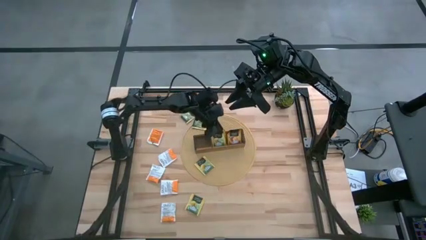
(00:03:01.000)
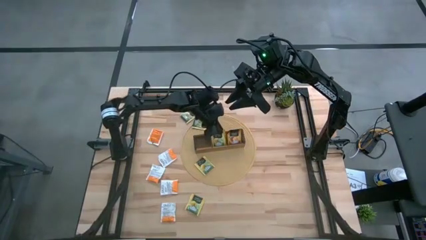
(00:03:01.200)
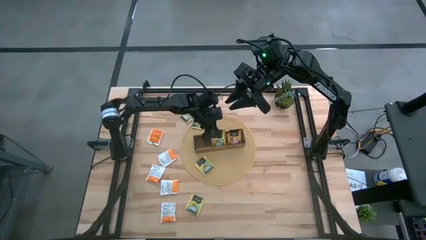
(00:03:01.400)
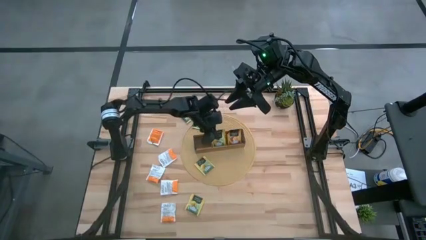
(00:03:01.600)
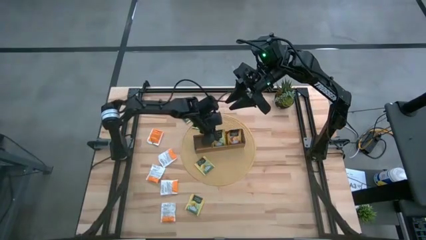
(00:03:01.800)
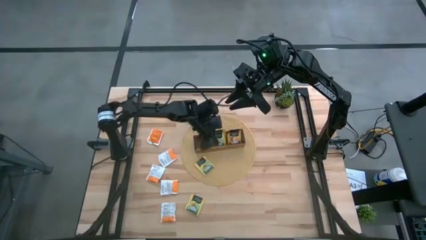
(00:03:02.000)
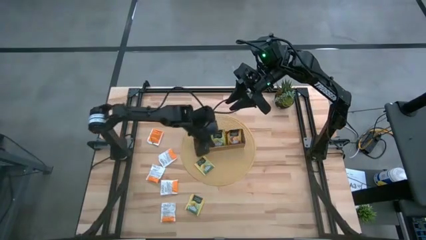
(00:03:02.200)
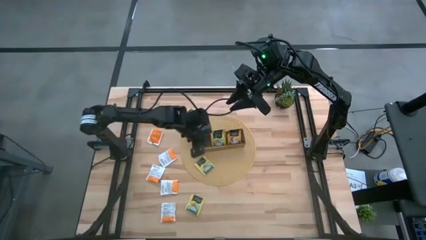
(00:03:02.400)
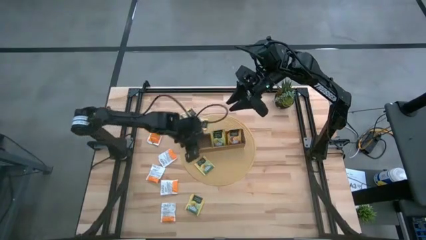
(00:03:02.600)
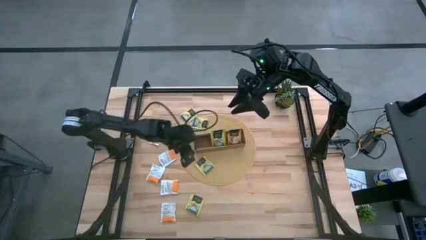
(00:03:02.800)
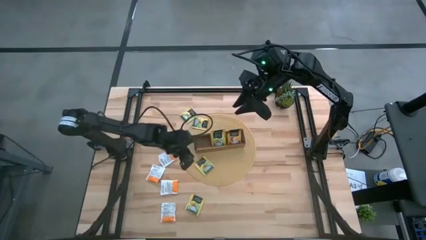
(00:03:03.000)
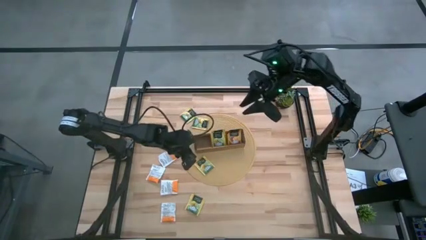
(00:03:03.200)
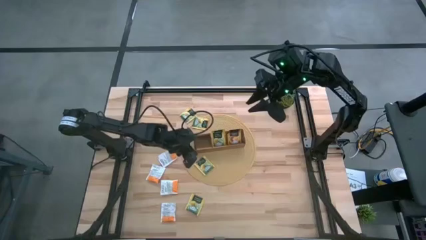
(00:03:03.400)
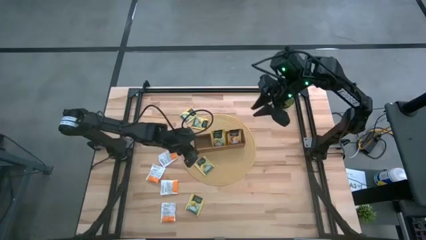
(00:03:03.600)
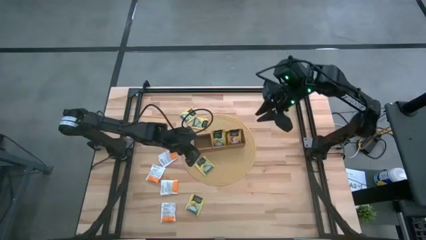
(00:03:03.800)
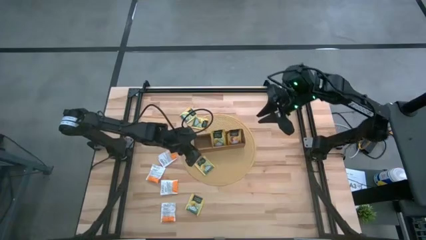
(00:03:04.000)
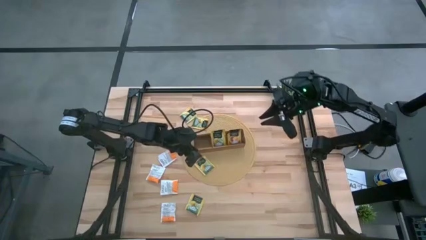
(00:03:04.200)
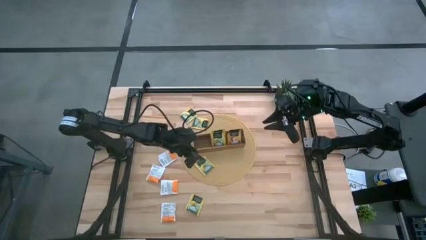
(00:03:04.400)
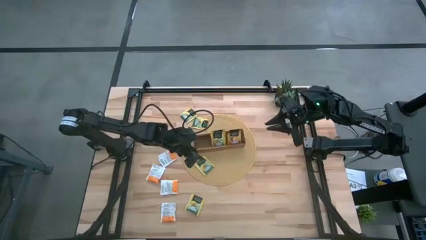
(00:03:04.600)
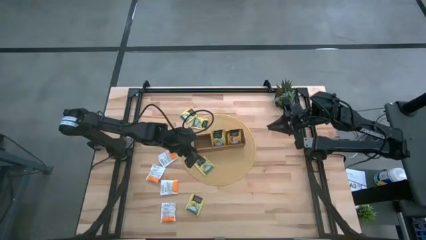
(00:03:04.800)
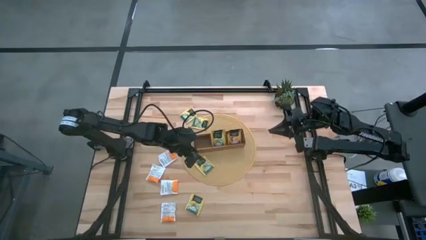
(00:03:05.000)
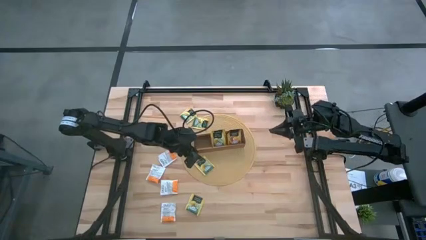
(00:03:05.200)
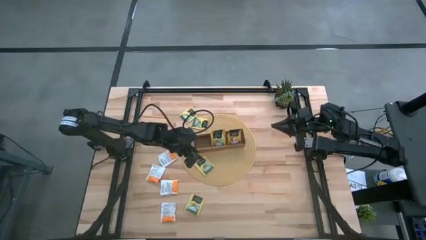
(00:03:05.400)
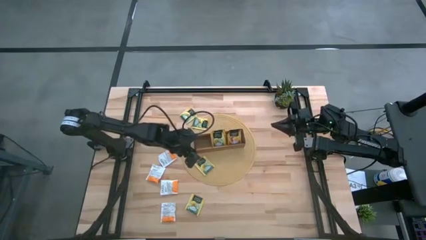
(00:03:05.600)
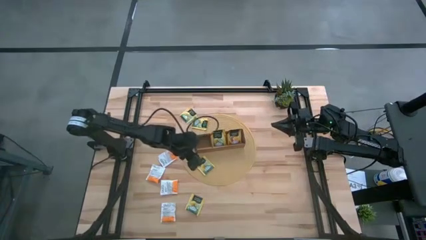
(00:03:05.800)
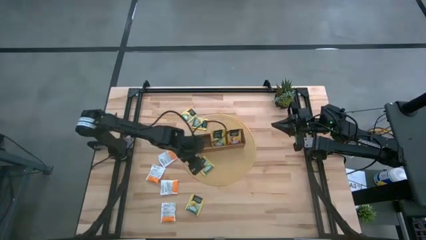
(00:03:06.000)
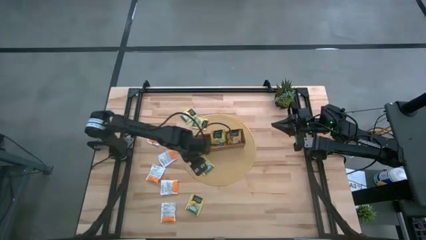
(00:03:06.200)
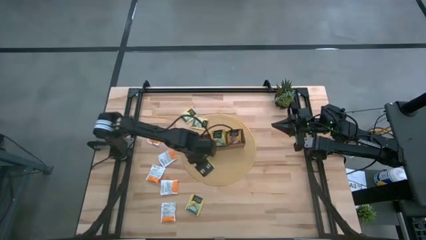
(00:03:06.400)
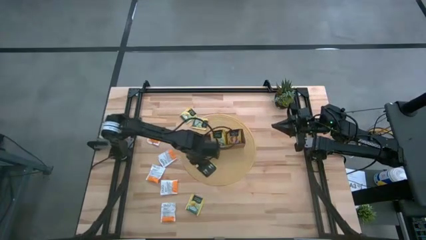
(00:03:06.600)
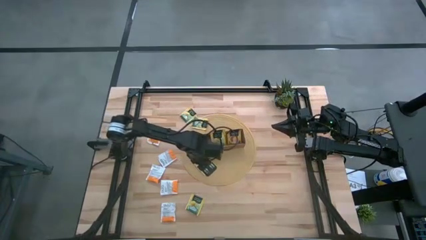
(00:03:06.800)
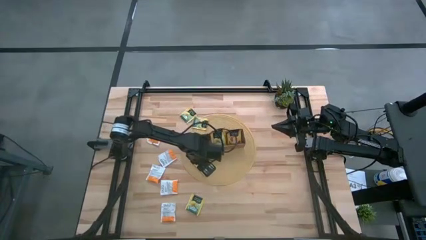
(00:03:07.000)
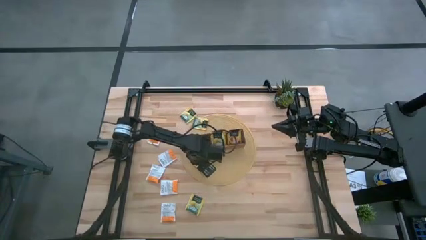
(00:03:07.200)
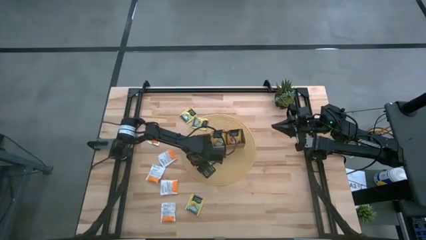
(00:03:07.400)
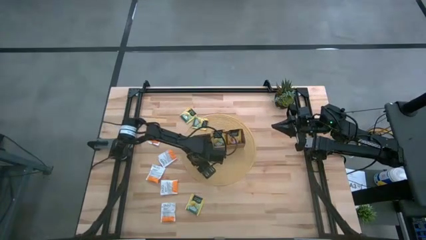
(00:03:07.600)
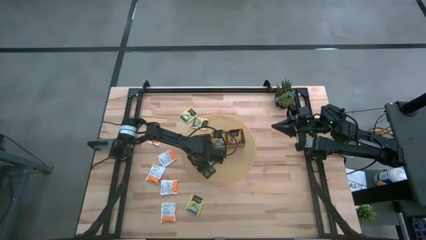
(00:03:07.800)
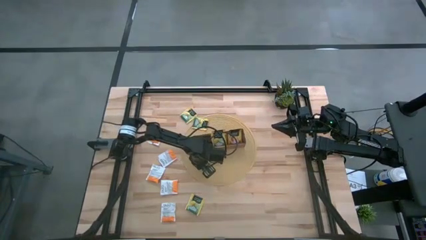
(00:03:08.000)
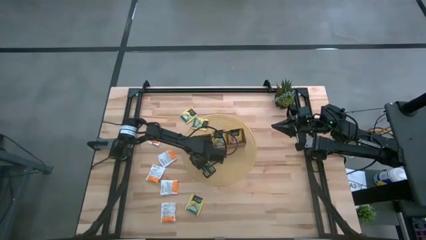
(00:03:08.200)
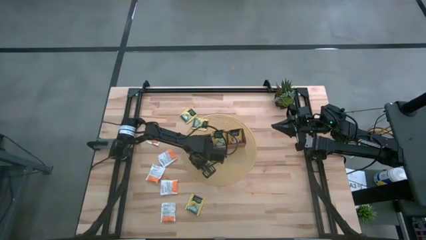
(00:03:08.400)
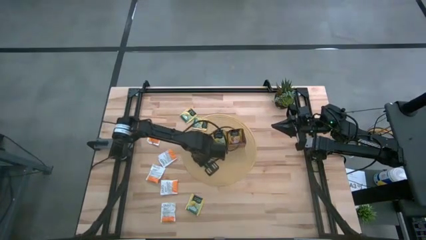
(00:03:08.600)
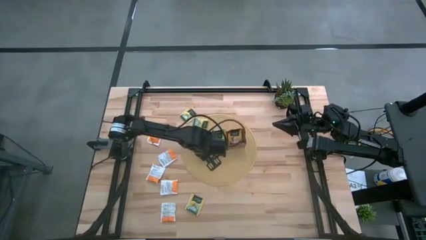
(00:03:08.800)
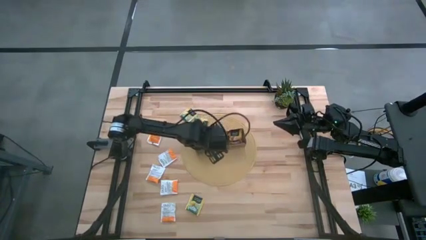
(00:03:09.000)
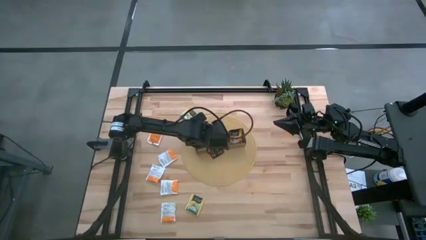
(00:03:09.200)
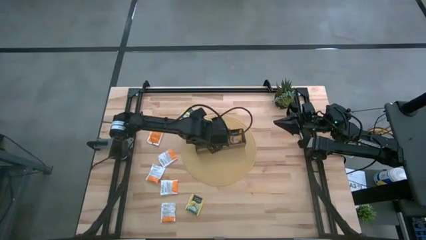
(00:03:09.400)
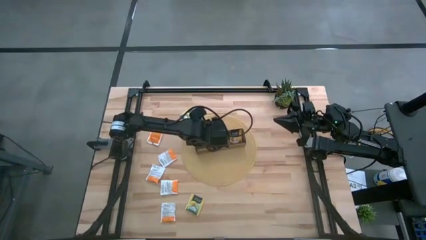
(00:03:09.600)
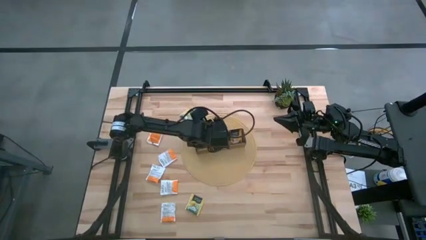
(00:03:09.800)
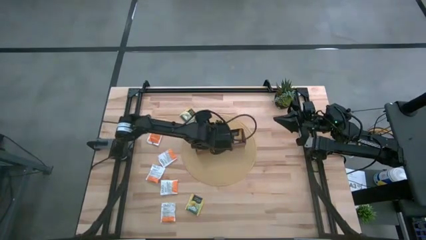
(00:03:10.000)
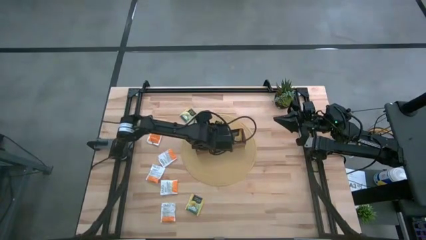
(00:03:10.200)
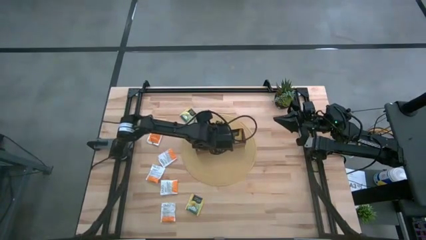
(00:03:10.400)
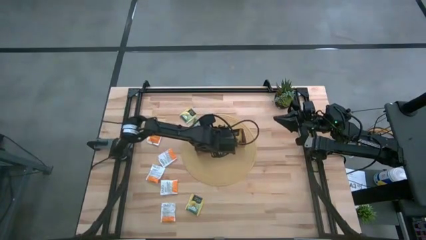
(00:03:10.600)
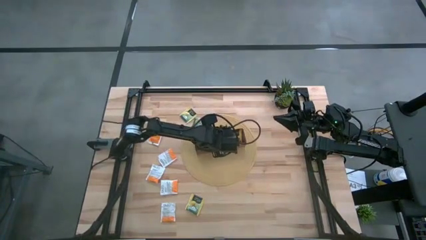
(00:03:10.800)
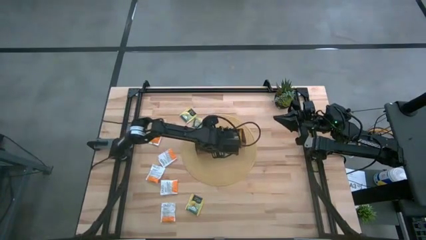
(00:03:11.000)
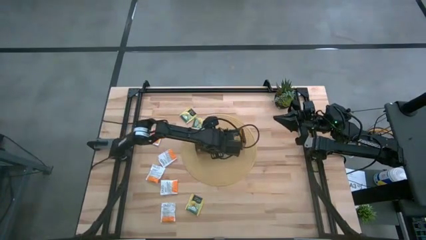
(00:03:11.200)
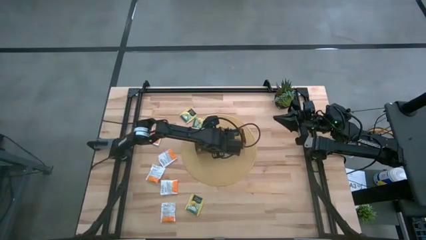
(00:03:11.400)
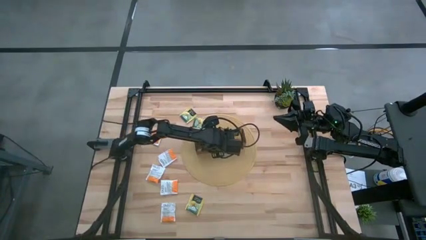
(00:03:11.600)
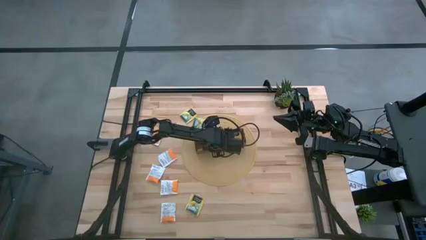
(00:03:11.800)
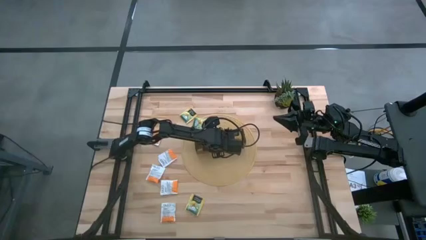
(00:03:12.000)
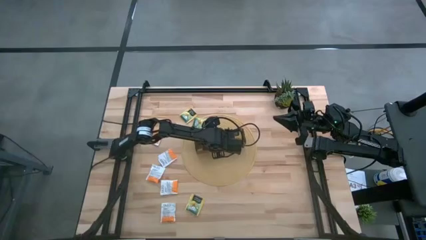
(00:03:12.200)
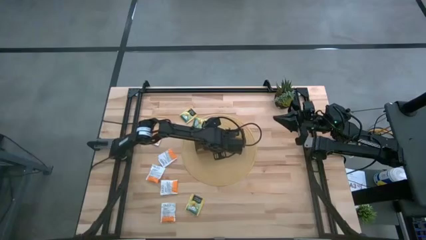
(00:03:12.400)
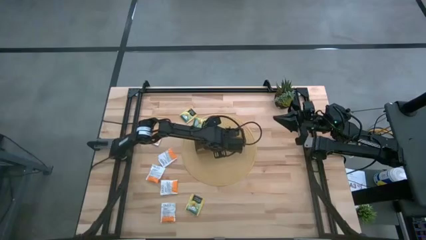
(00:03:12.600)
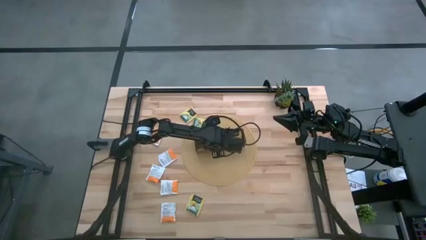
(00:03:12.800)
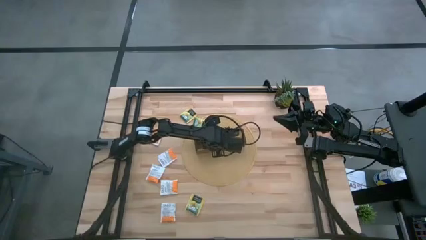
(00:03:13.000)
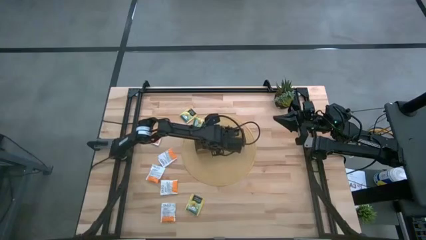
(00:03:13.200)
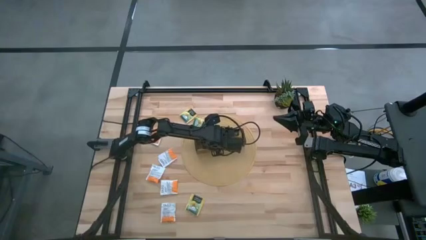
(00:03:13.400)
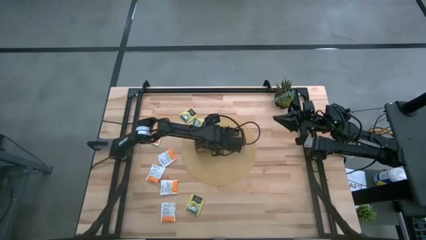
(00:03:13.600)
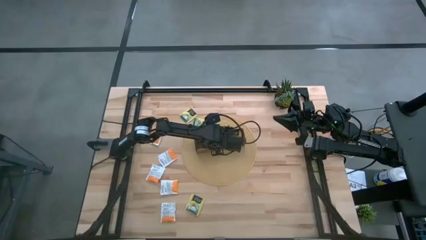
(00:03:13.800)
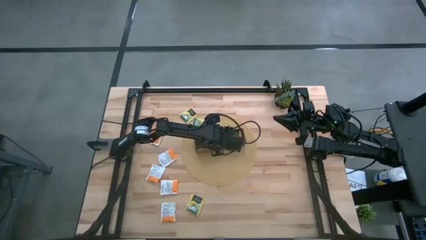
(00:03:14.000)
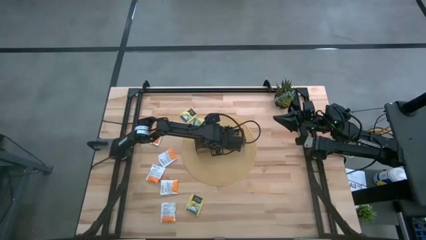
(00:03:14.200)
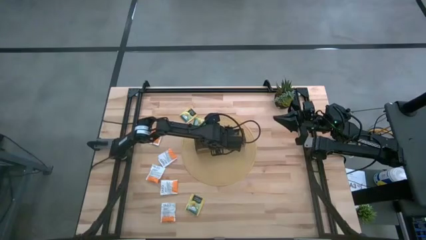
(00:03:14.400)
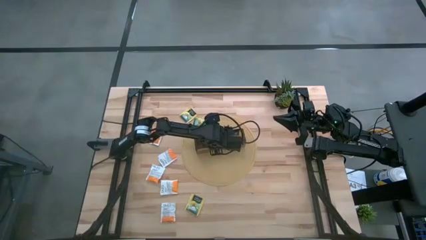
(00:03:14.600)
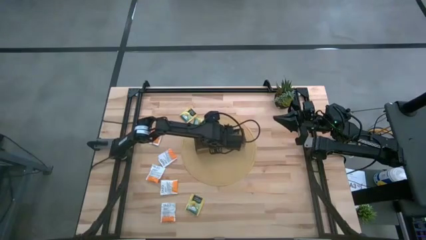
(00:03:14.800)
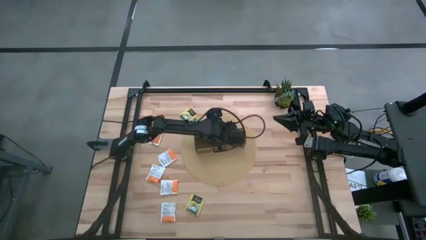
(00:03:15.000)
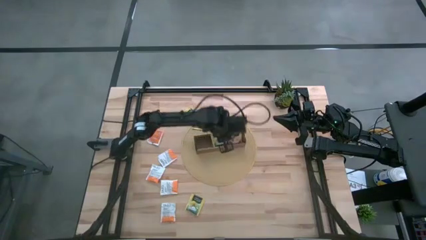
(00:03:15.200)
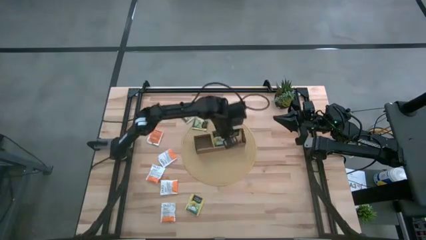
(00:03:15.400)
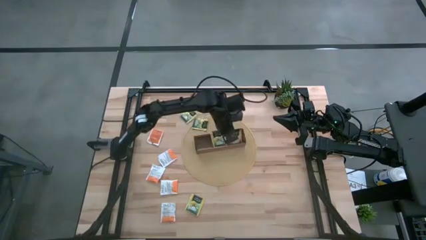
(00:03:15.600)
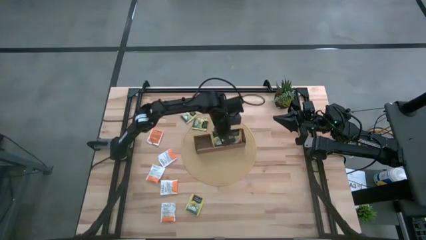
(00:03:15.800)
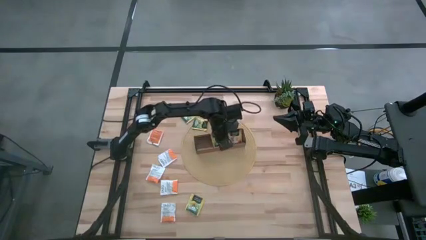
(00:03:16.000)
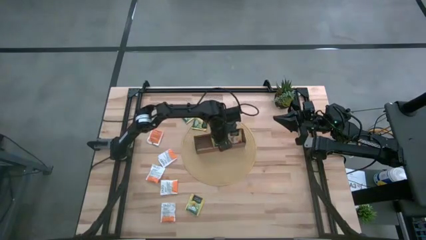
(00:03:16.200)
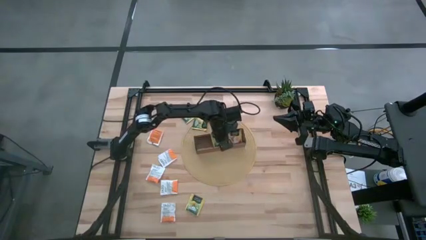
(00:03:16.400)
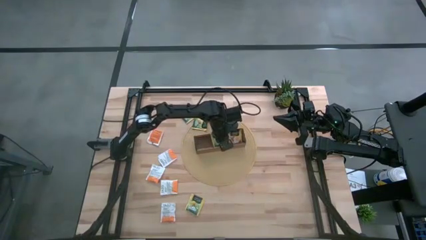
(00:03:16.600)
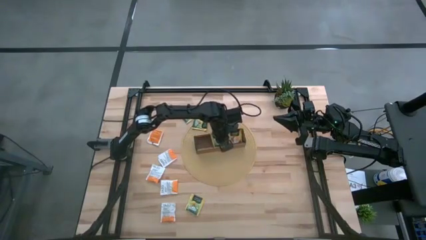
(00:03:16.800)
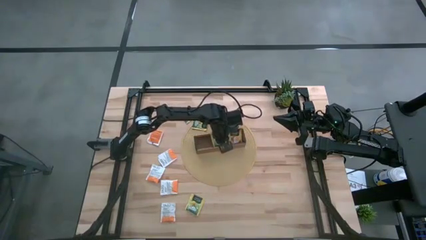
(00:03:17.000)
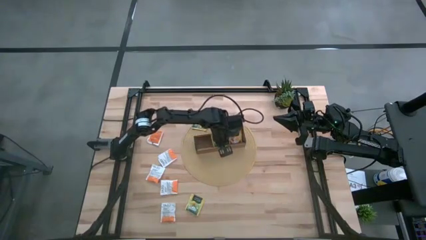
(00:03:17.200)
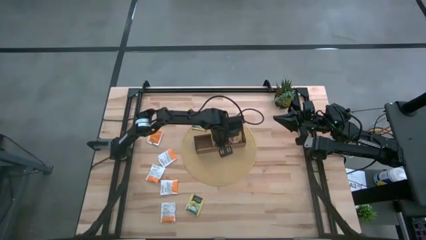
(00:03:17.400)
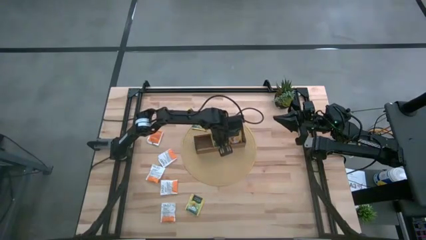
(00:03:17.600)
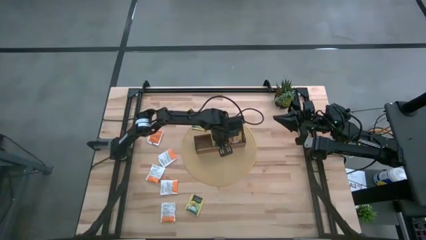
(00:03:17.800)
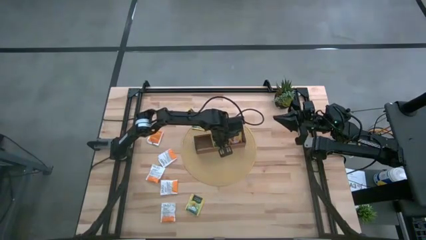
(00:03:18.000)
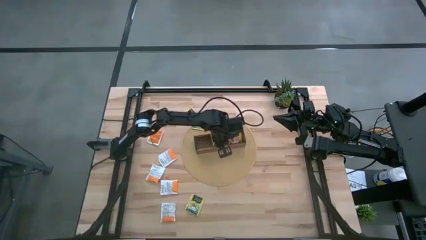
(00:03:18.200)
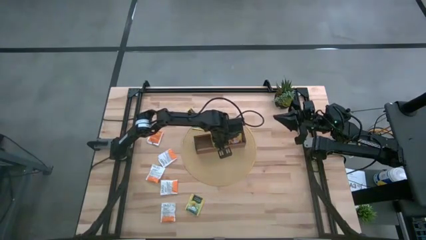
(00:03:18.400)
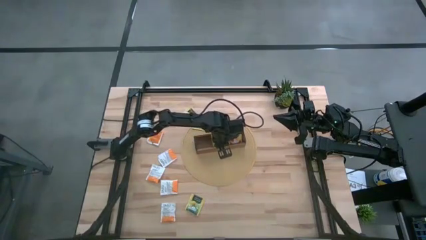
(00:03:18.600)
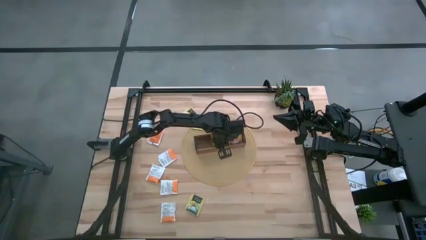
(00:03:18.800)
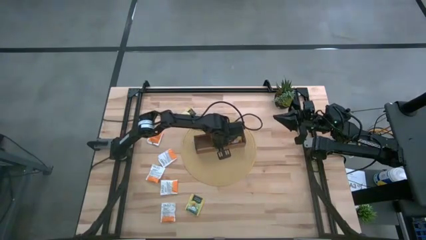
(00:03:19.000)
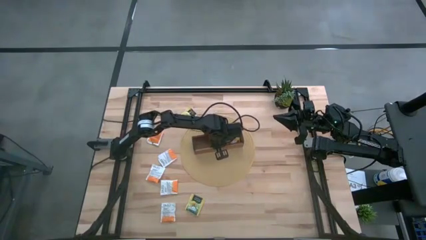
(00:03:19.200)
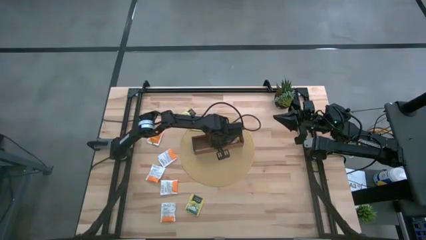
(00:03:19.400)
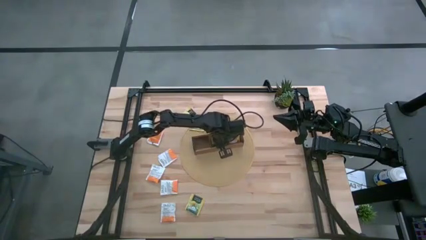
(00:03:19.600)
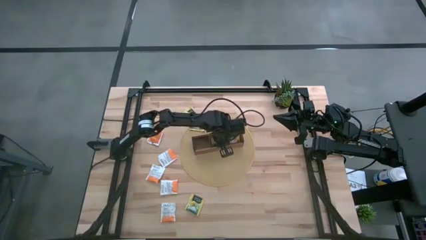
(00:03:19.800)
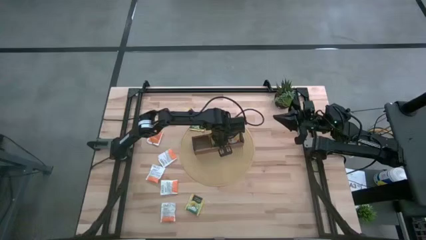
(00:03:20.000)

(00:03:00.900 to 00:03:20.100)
Task: Pick & Place Tea
Put the yellow tea bag into the middle section of the wooden organizer
